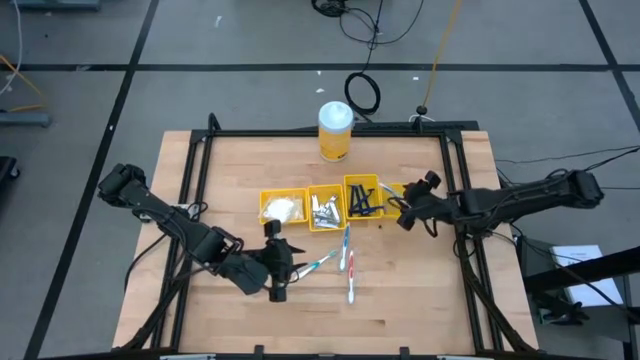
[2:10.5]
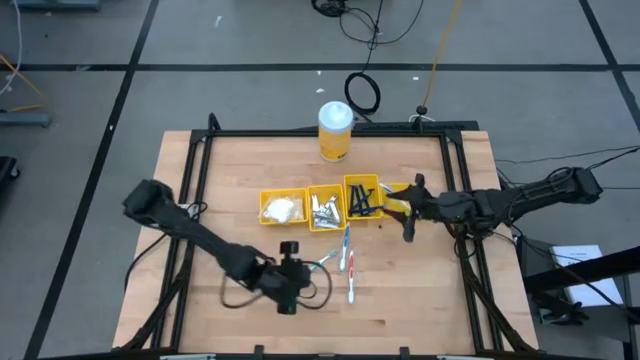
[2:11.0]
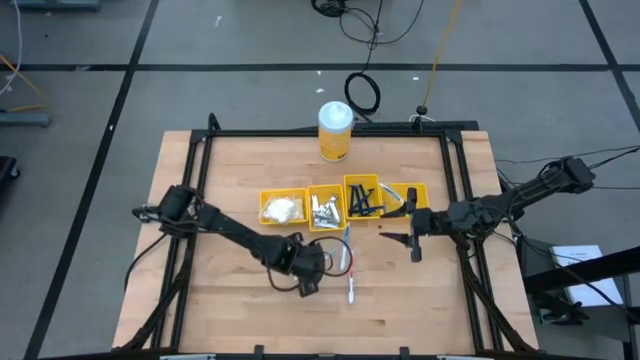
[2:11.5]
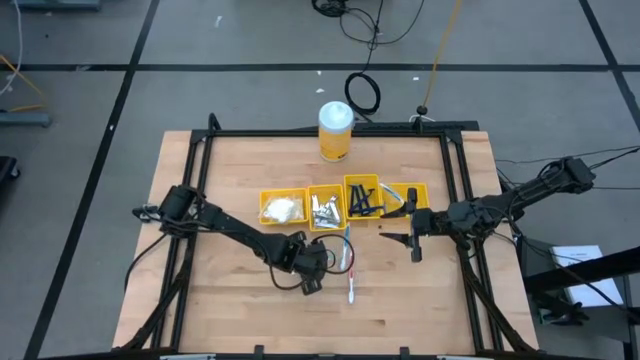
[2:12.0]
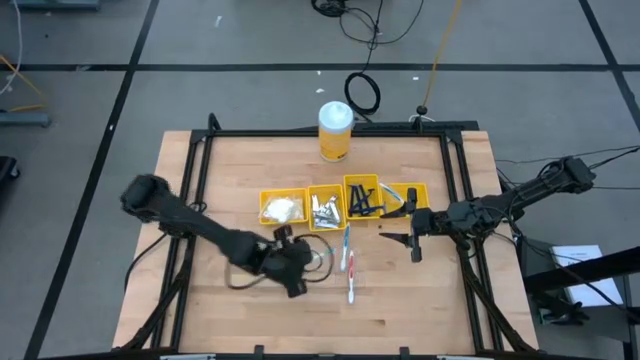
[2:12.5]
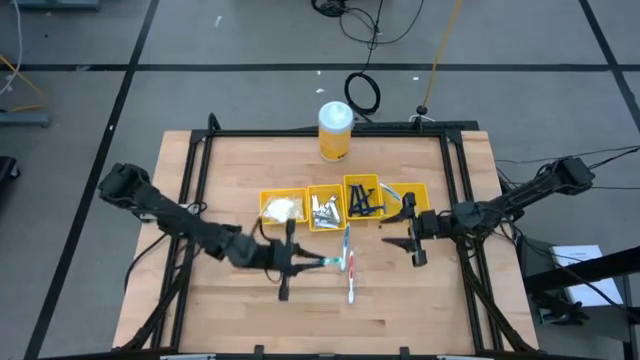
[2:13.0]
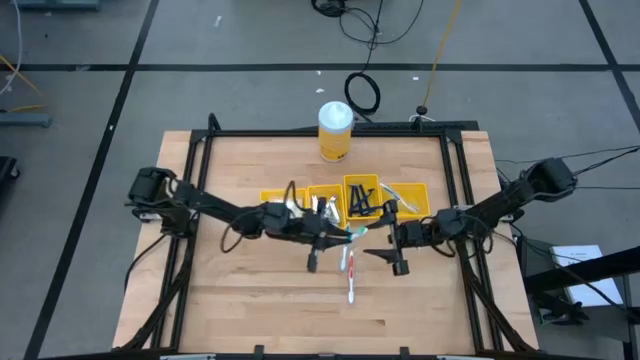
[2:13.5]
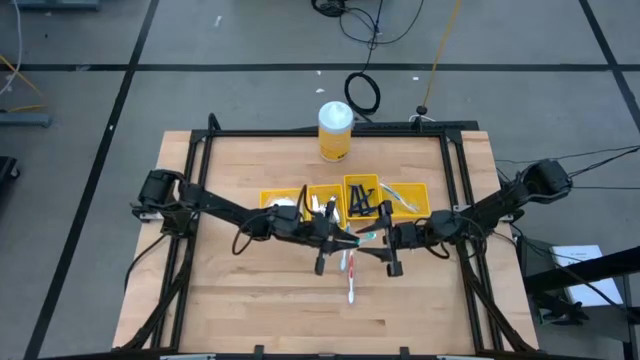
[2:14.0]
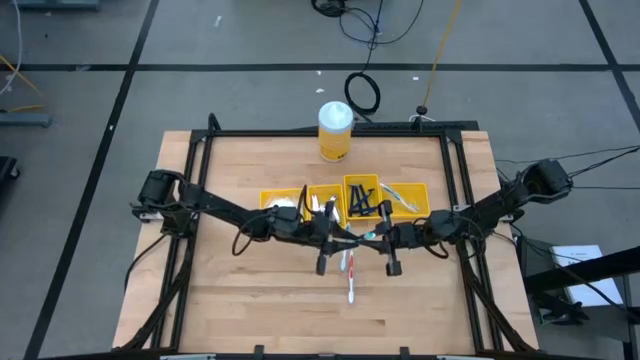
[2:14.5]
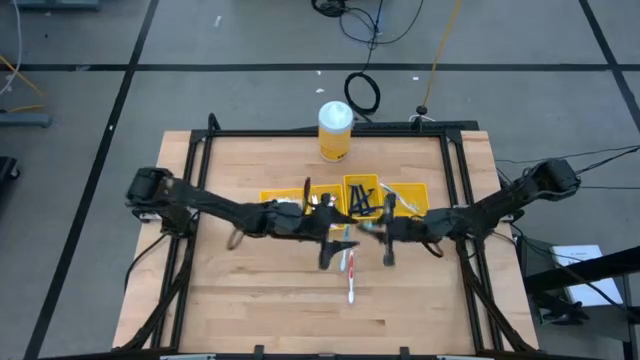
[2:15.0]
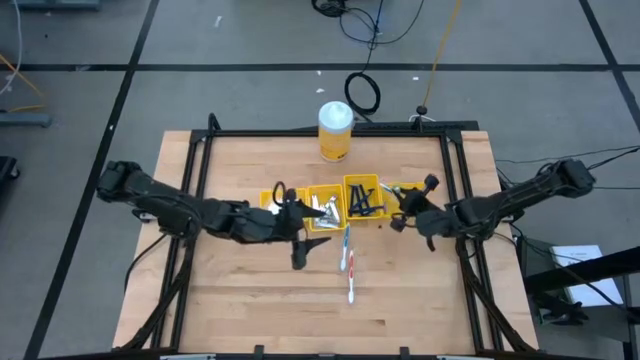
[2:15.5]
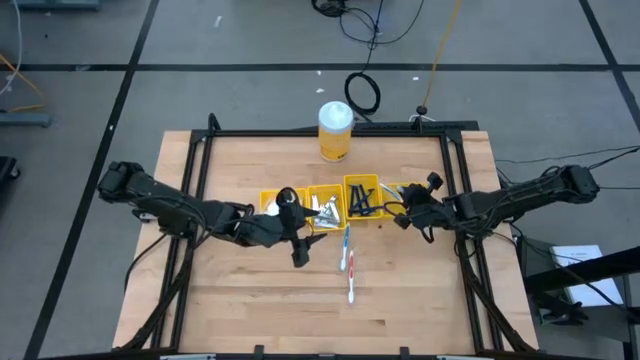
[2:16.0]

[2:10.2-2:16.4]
Task: Pick & Place Travel size toiletries
Put the green toothbrush into the right yellow bin

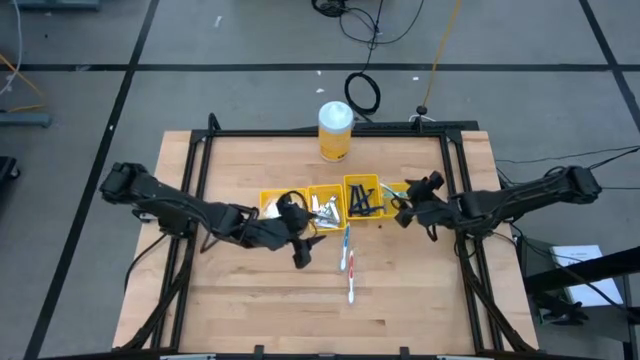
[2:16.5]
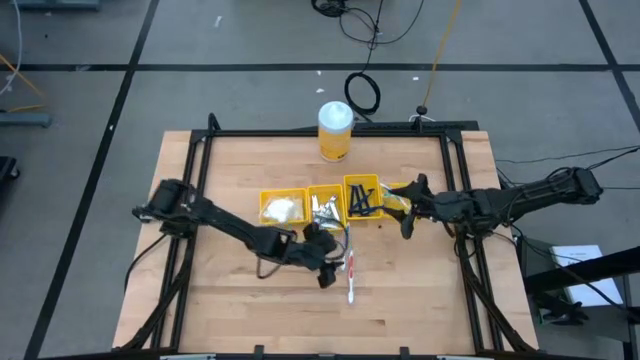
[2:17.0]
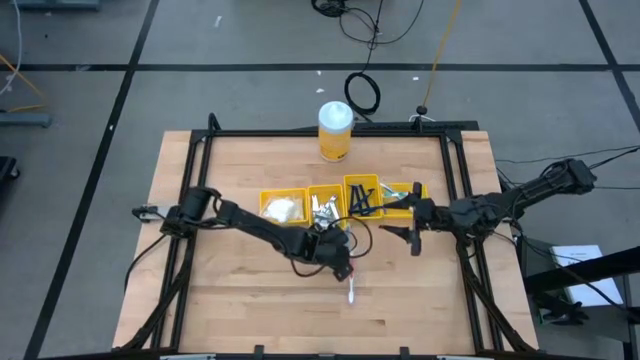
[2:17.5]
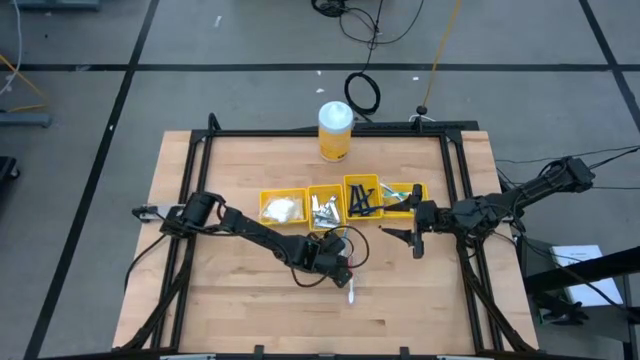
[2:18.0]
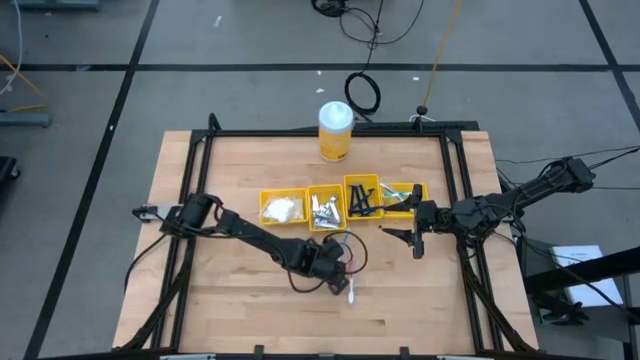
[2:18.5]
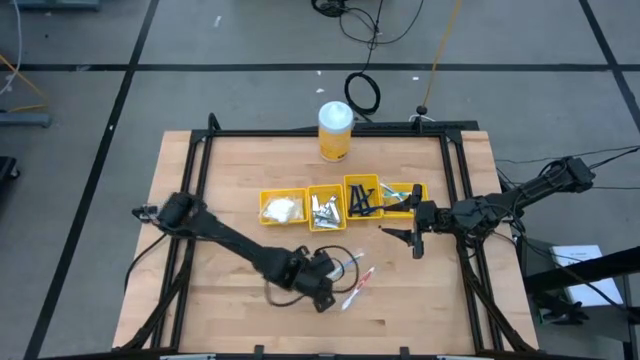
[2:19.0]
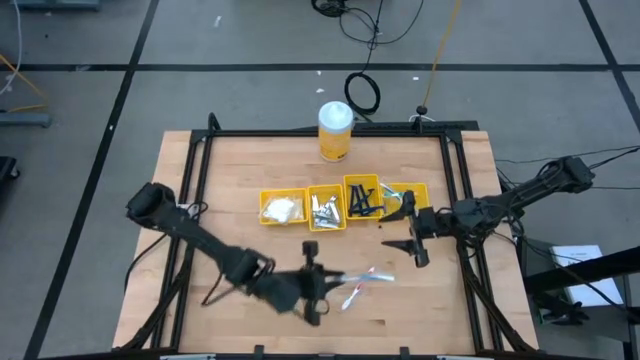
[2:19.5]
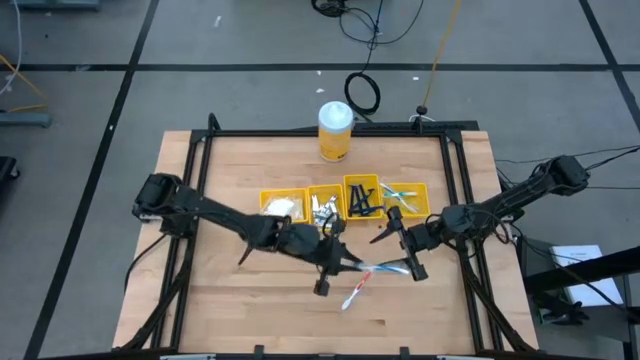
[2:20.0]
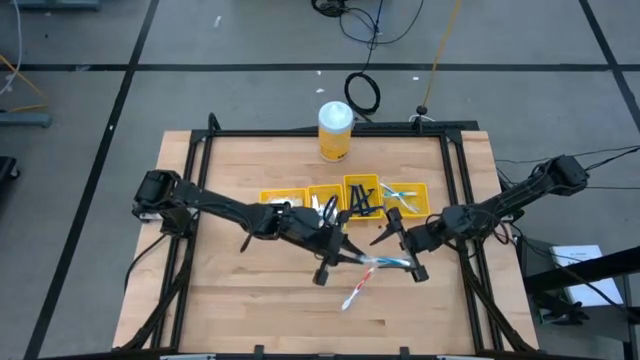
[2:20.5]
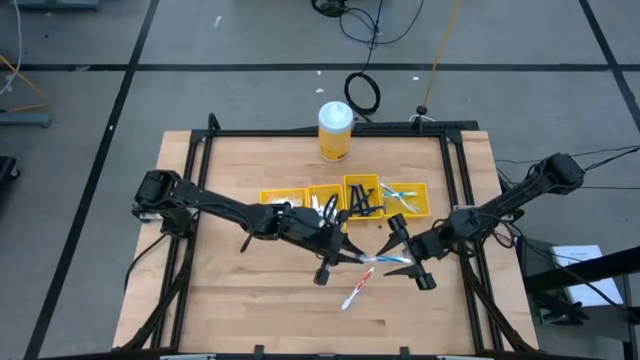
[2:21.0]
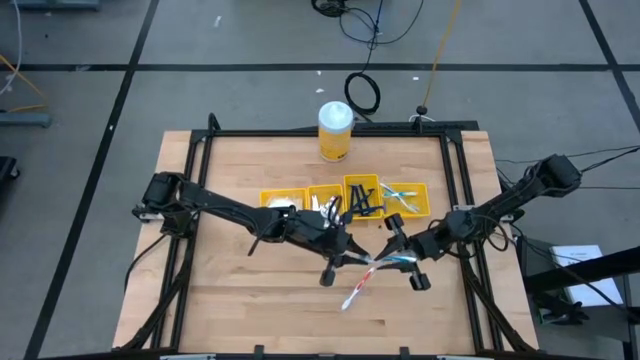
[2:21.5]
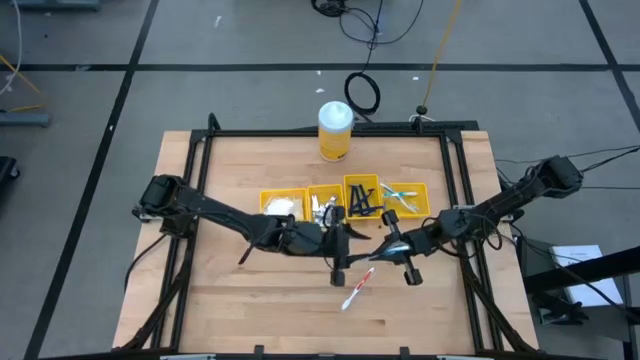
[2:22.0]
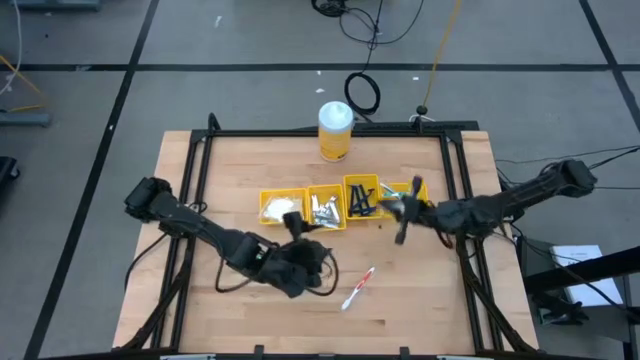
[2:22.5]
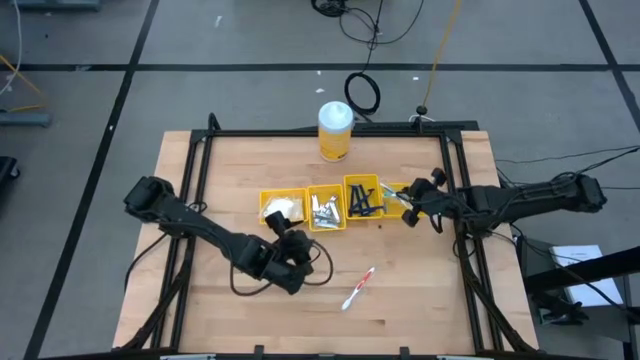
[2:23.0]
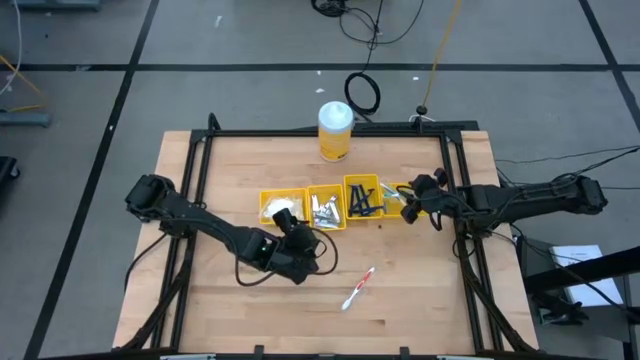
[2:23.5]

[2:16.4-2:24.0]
Put the light blue toothbrush into the right yellow bin

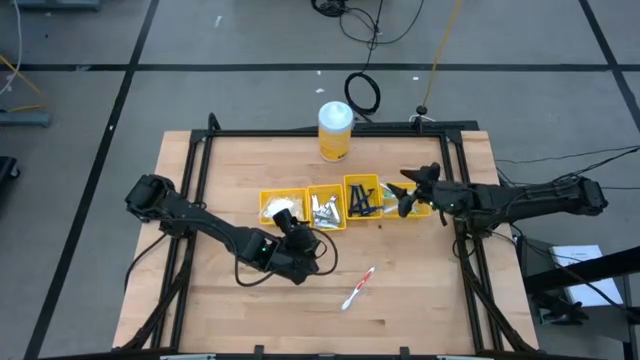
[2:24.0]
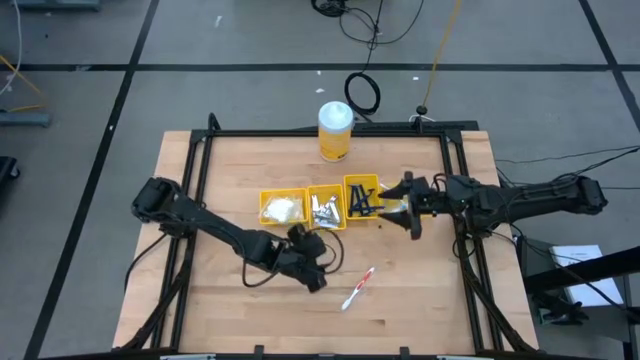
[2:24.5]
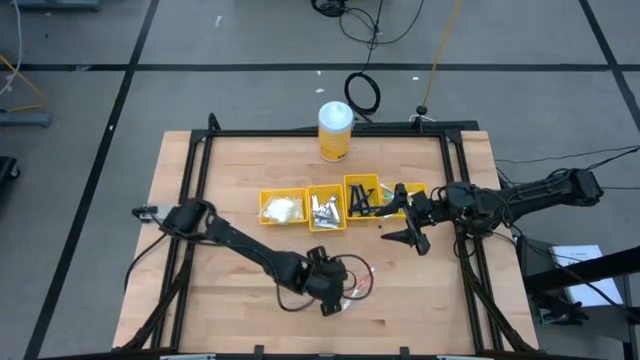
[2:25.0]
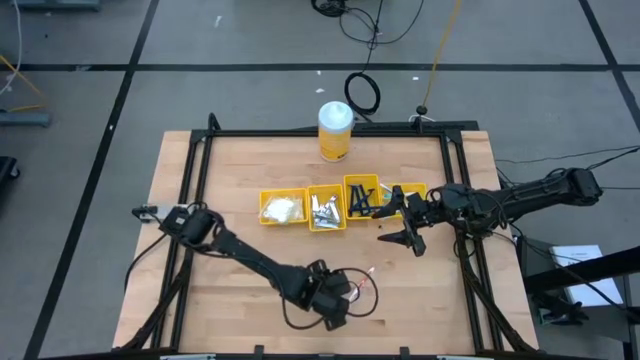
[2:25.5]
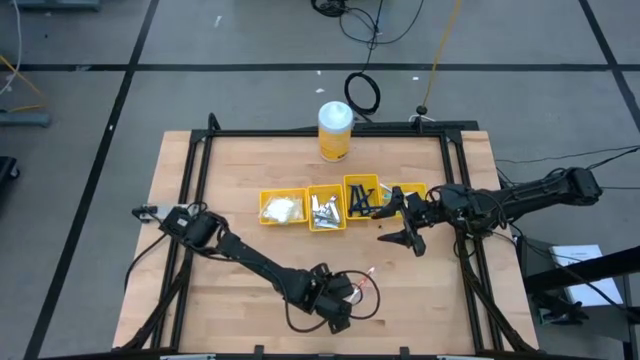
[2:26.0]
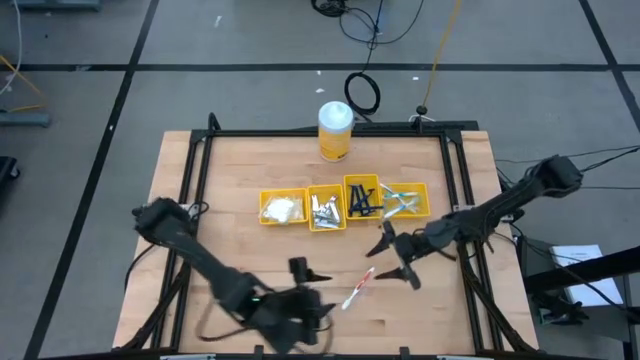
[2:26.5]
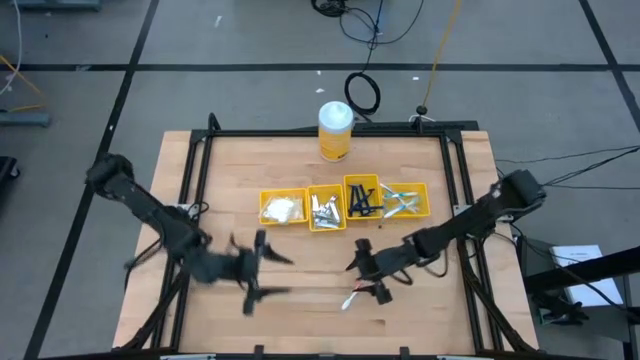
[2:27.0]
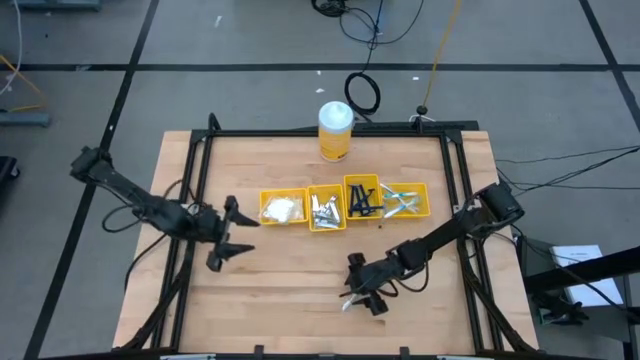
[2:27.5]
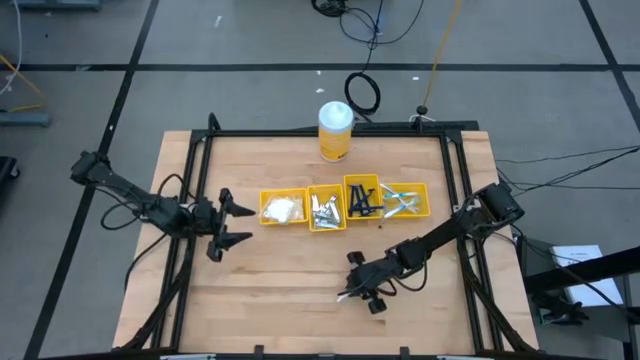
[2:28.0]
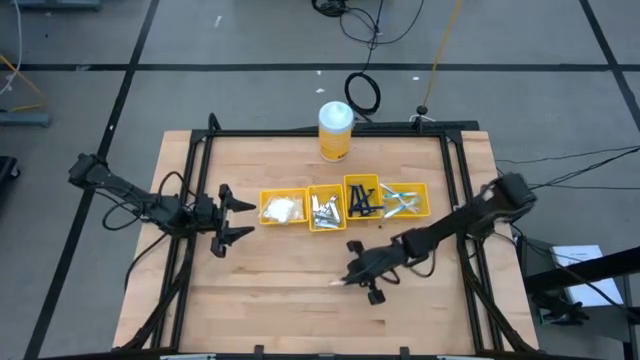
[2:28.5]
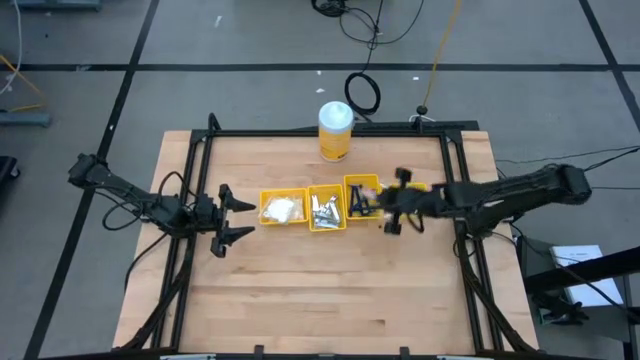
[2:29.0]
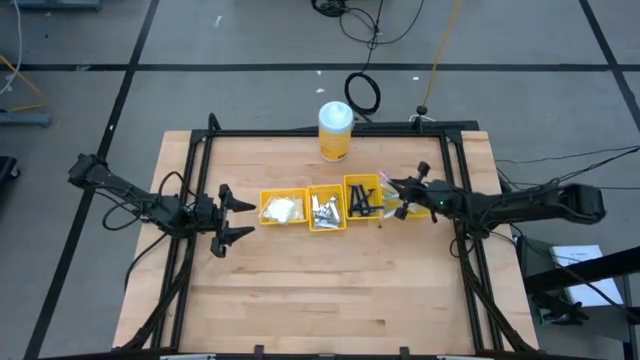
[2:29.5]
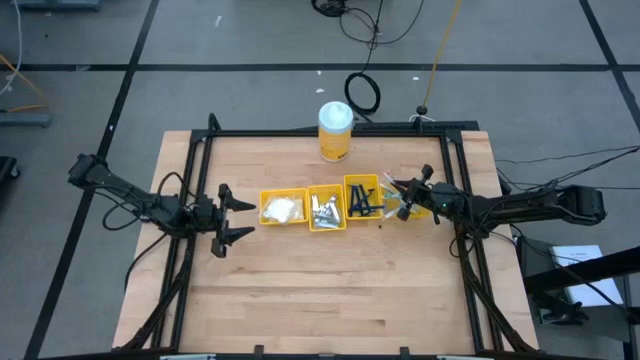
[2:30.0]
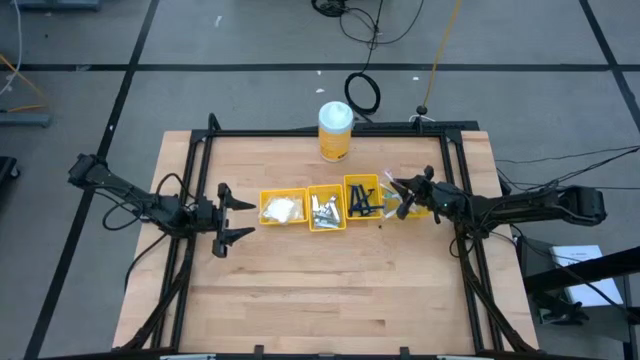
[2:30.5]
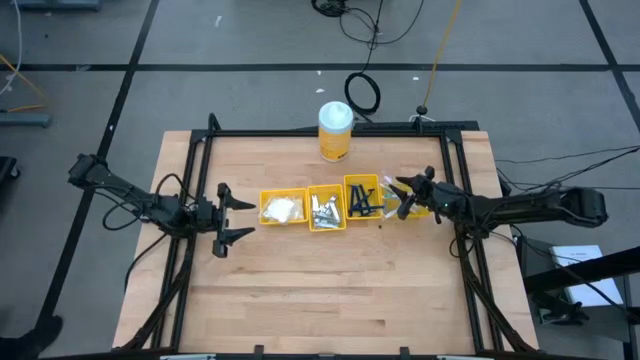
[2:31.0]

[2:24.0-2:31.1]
Put the red toothbrush into the right yellow bin
